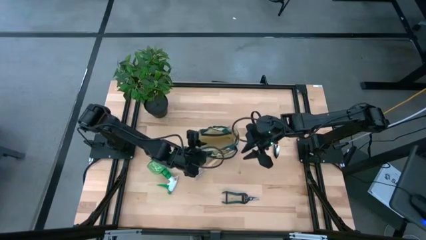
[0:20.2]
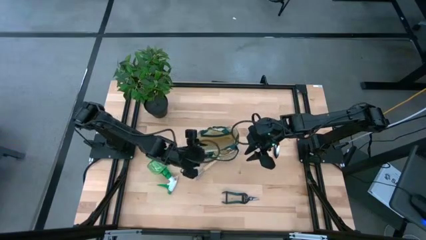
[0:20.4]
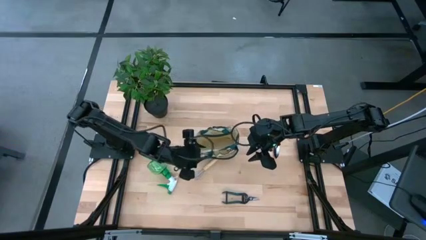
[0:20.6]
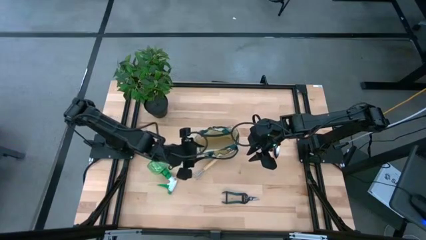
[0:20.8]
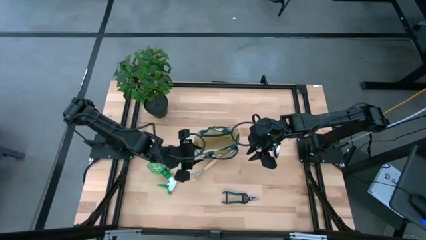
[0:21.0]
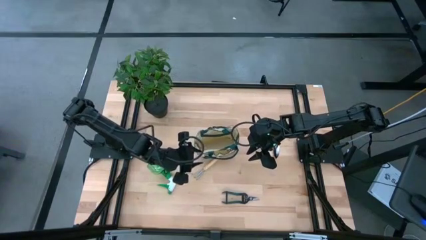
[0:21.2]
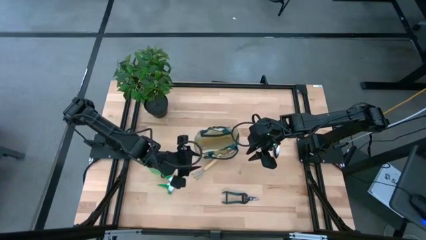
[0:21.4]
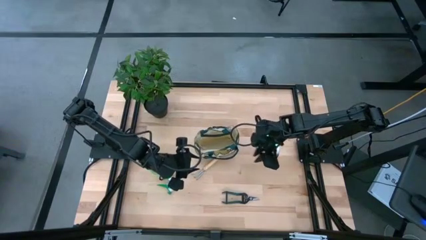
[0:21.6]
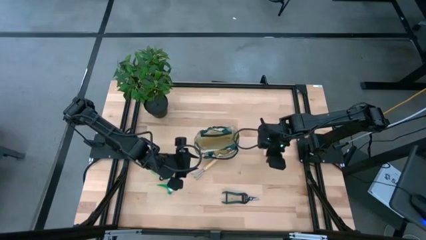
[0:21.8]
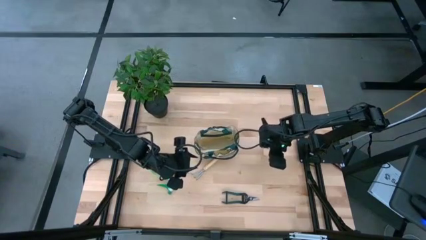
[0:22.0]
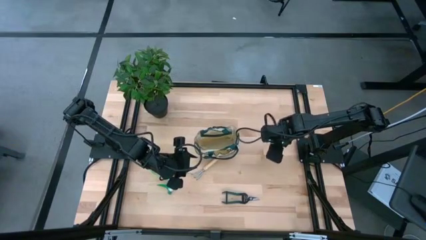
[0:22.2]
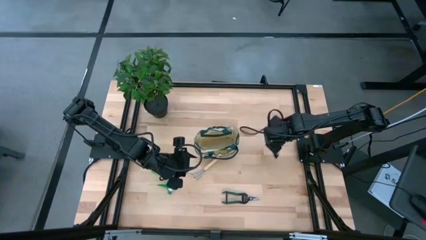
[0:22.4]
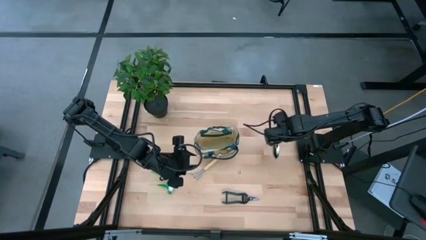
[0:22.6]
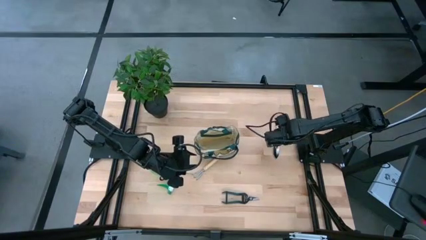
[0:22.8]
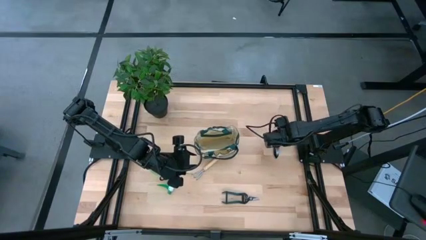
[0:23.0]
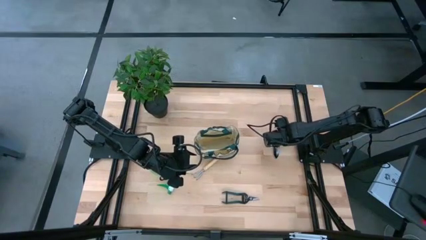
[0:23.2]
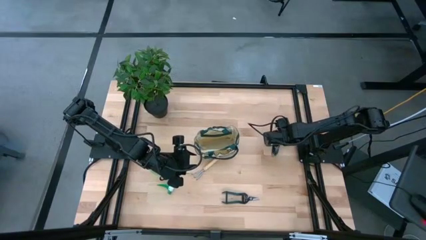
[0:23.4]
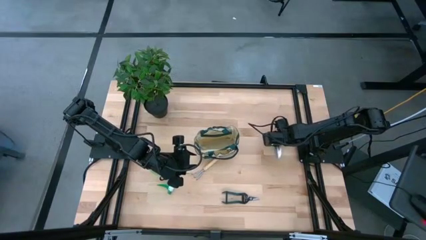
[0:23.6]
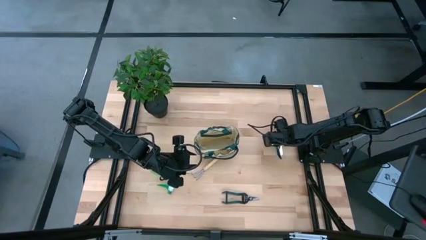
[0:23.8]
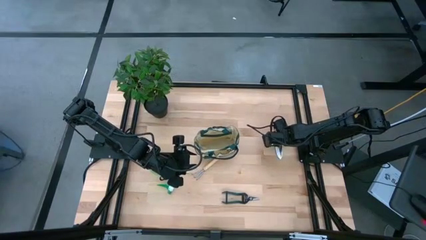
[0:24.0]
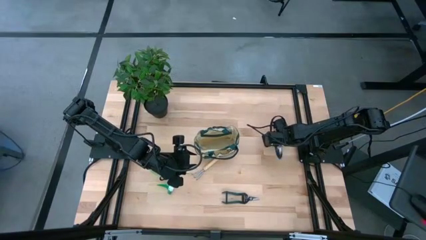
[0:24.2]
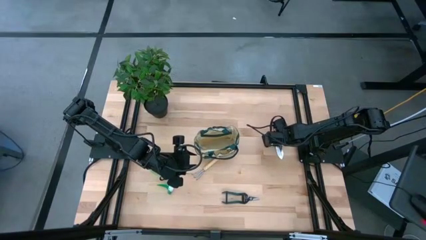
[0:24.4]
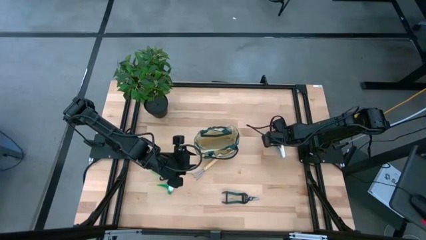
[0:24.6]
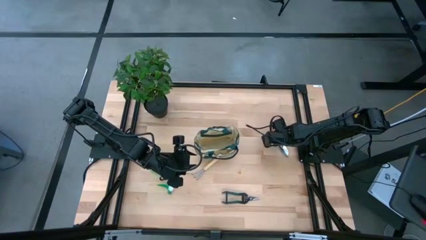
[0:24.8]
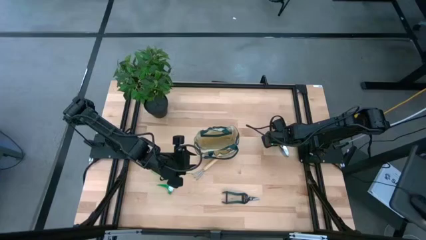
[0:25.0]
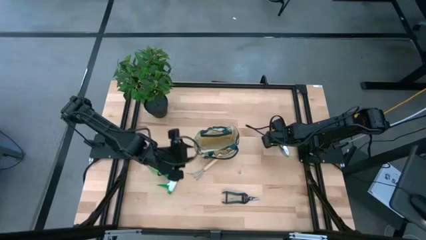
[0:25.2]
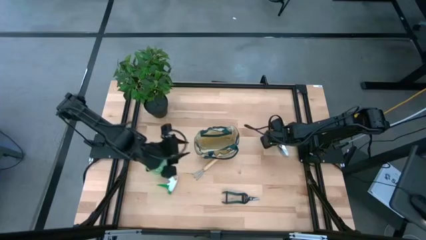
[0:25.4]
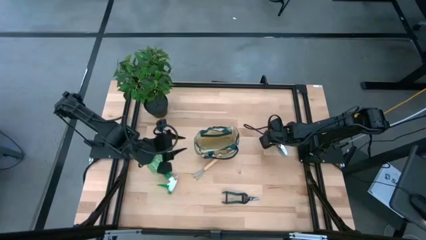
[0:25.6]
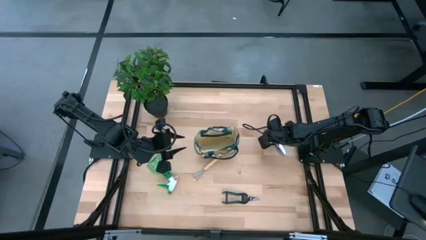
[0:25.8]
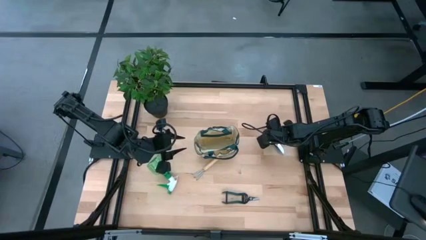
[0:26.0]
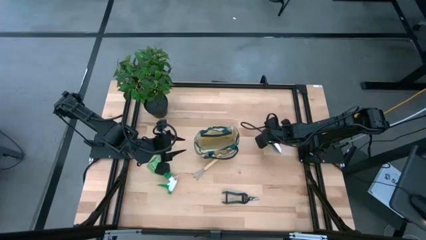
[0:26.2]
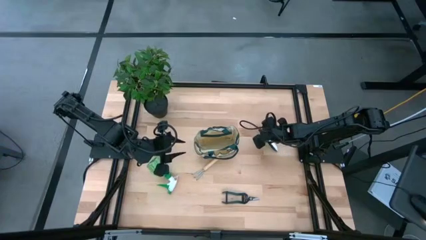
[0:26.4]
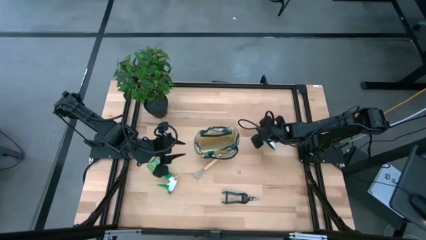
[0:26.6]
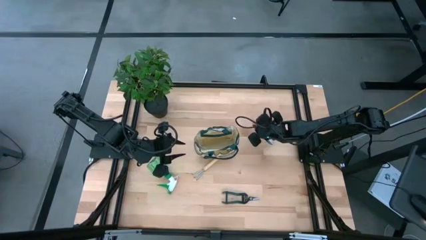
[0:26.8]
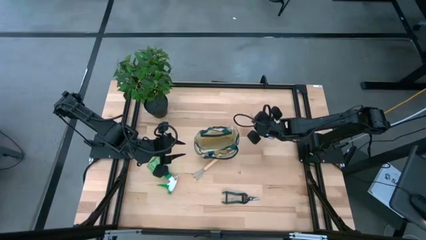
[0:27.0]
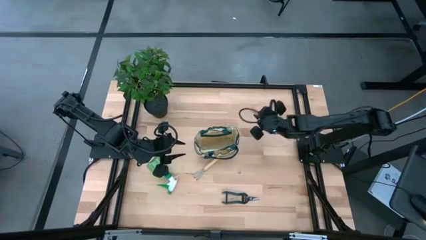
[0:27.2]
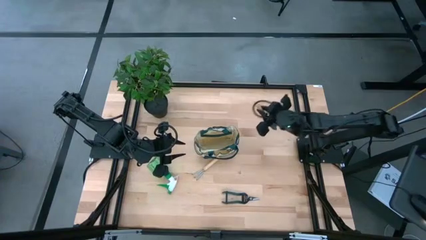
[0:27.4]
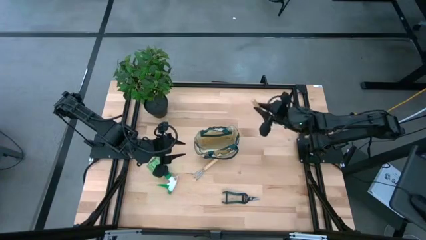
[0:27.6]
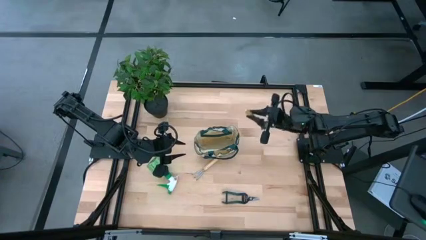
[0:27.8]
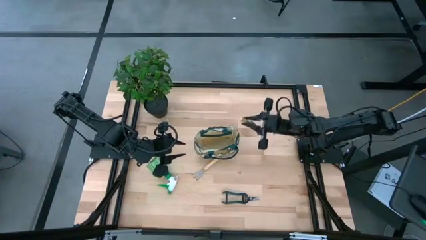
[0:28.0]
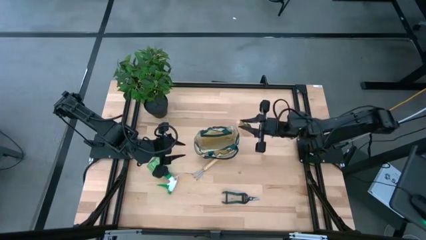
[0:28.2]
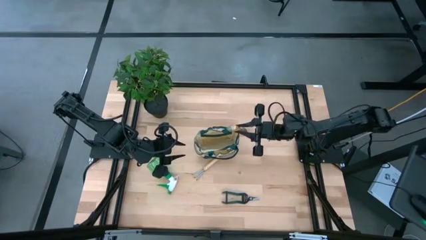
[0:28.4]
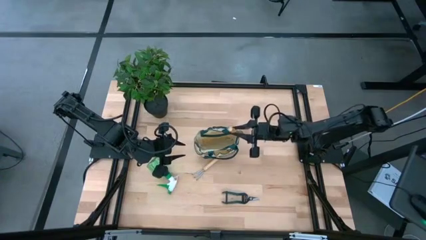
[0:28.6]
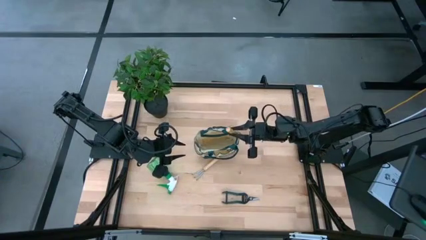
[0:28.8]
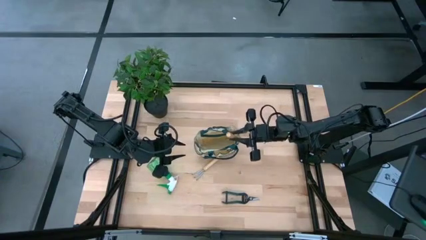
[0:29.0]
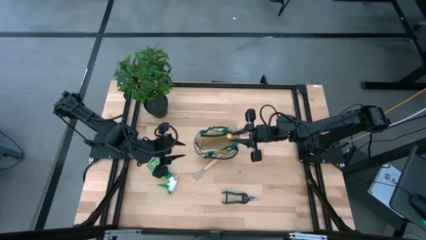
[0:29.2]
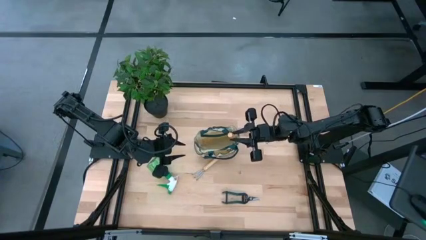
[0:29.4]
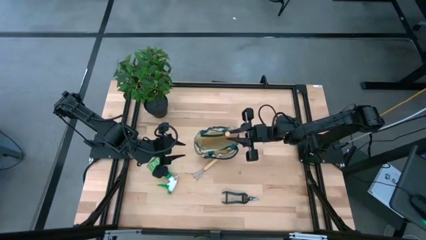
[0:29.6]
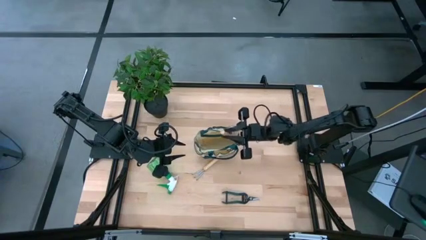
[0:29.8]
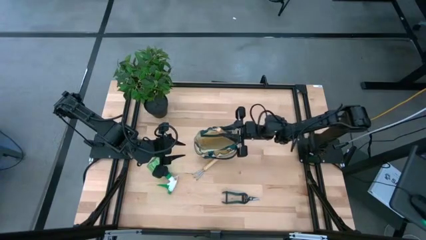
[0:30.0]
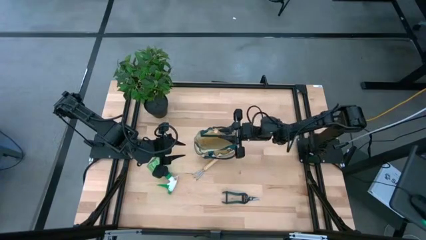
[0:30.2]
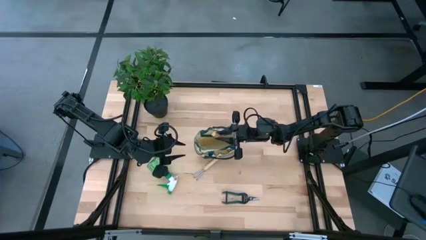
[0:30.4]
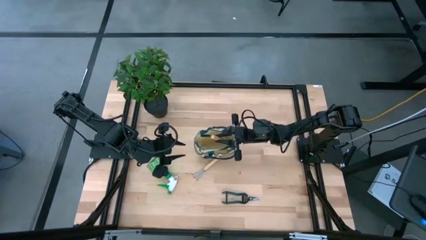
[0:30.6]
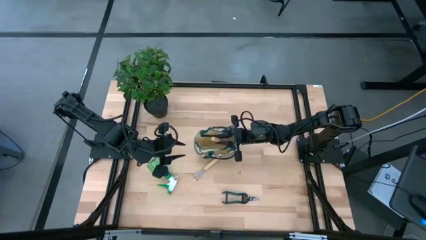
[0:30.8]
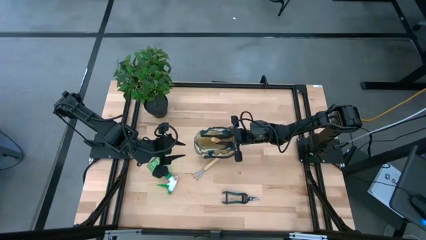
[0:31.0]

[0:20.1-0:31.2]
Task: Pick & Place Garden tools in Gardening bag
Put the brown trowel into the green gardening bag

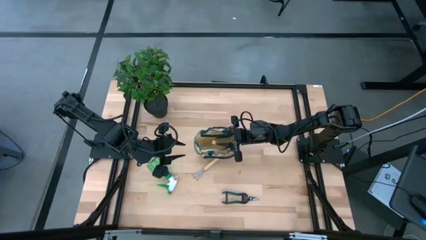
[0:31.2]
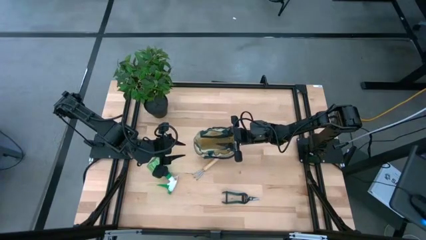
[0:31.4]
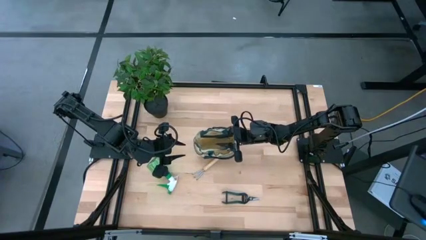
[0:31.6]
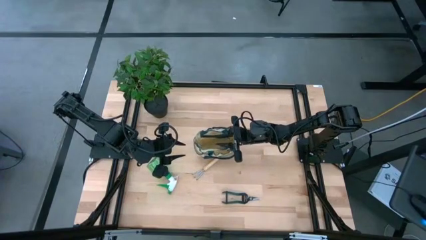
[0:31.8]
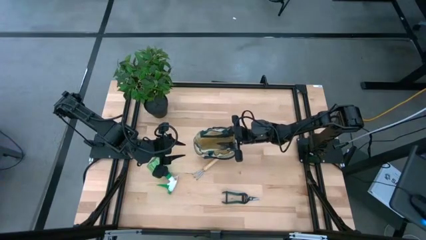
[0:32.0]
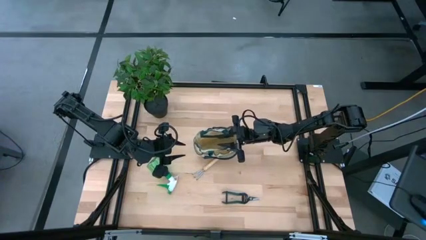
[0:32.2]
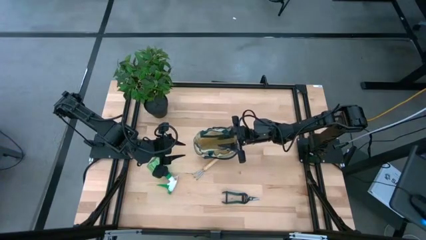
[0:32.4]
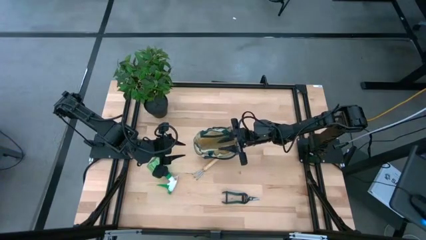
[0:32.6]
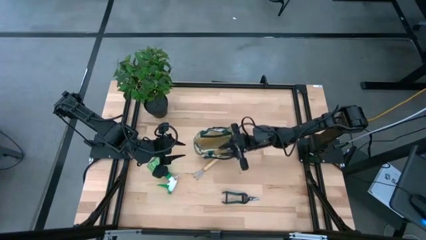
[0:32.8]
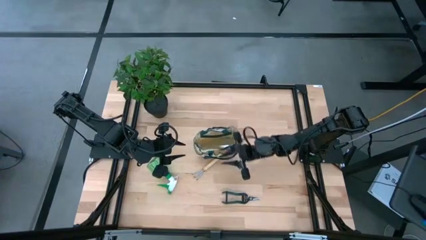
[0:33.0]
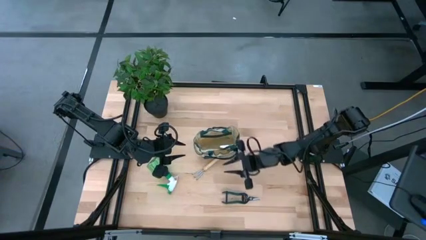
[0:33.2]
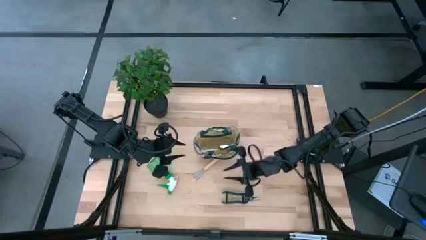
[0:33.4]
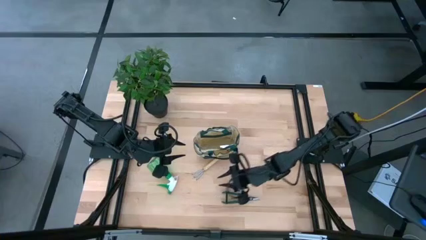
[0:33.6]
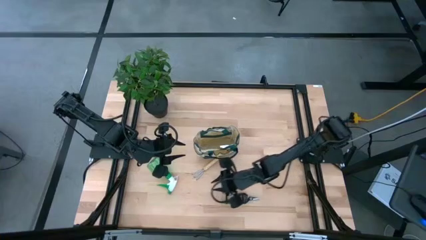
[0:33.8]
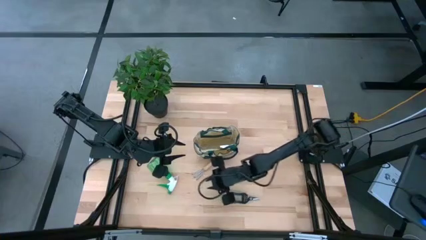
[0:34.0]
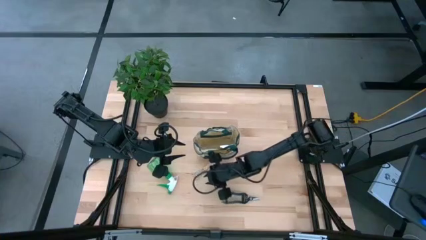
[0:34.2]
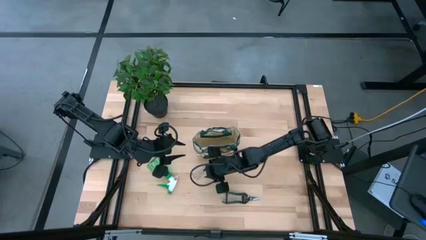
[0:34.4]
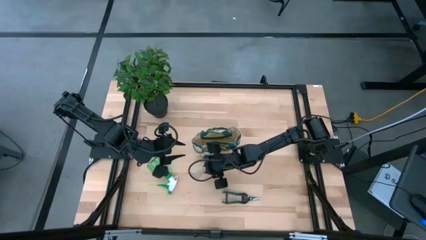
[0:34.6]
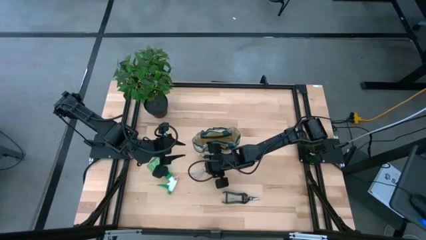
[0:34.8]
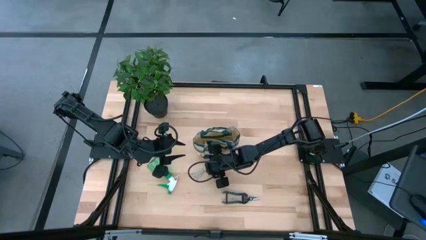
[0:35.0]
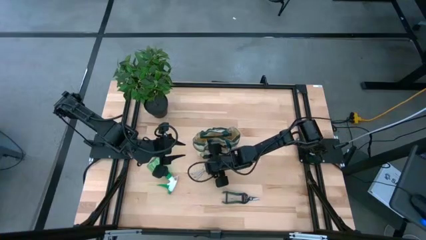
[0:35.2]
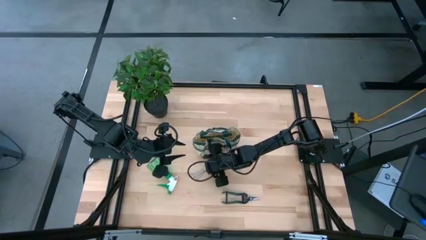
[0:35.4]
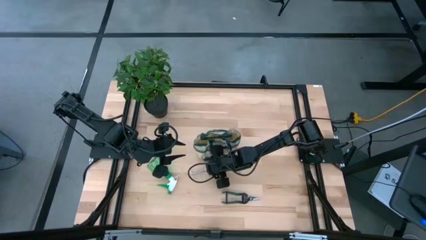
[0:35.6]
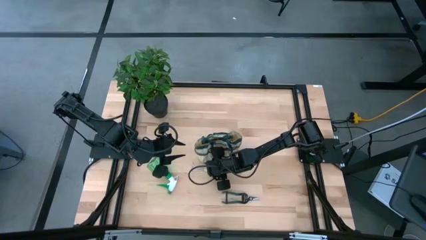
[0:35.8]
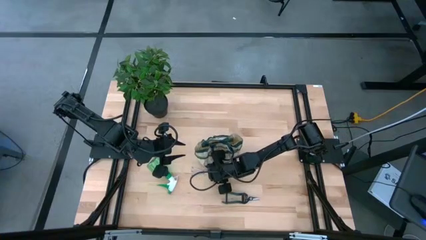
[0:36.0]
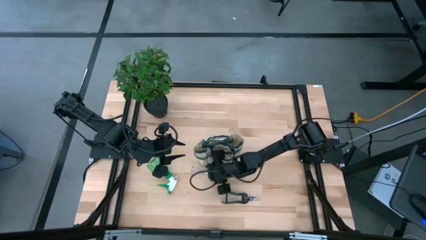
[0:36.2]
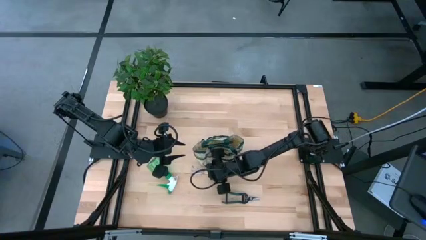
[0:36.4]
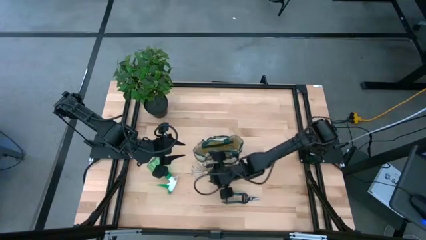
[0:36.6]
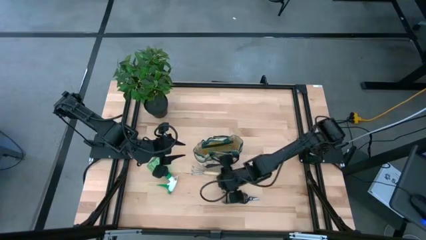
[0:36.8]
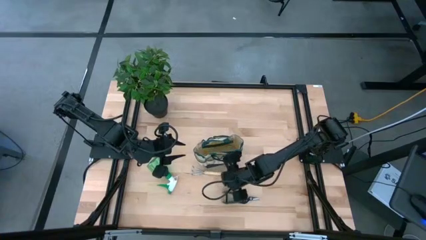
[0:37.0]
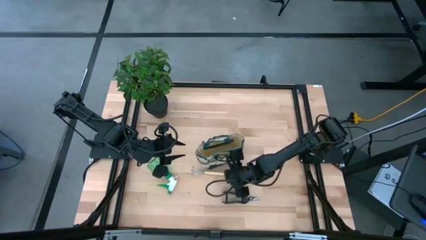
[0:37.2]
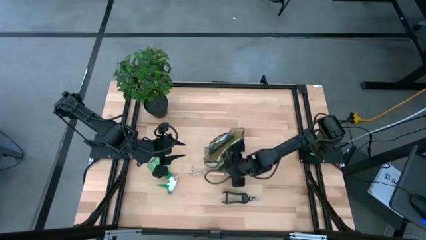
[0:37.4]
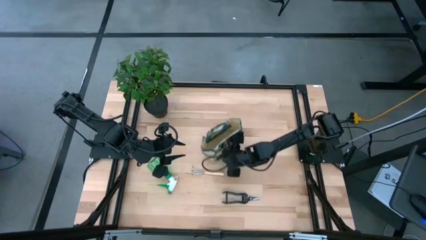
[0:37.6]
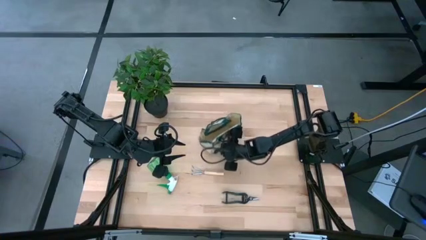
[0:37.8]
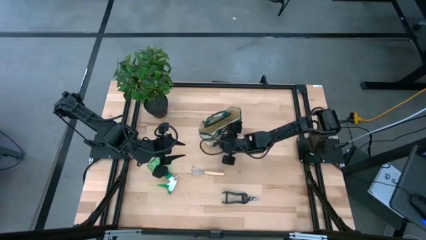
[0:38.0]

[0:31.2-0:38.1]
Adjust the green gardening bag
